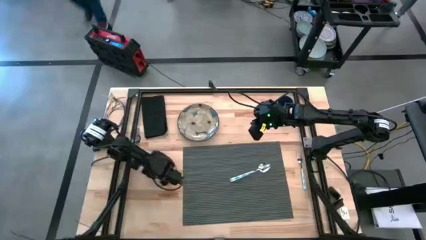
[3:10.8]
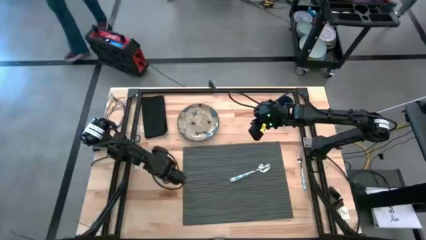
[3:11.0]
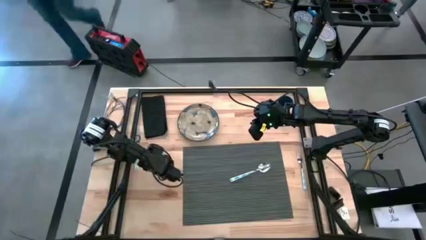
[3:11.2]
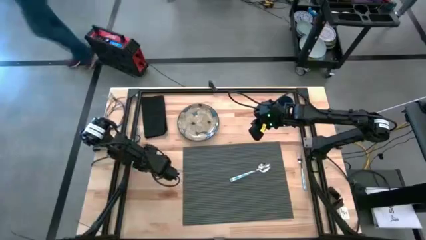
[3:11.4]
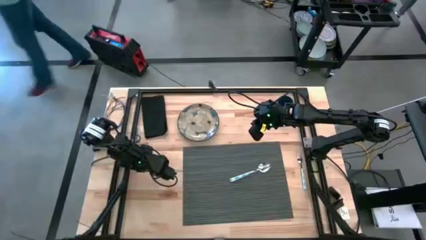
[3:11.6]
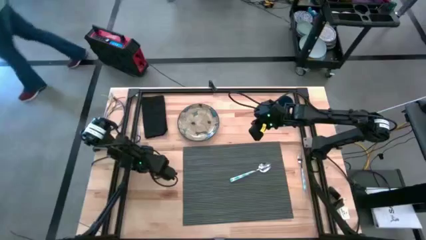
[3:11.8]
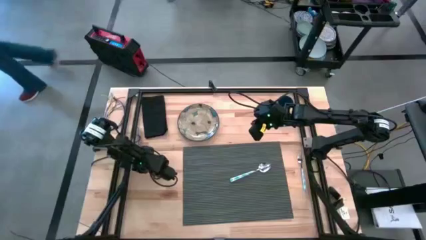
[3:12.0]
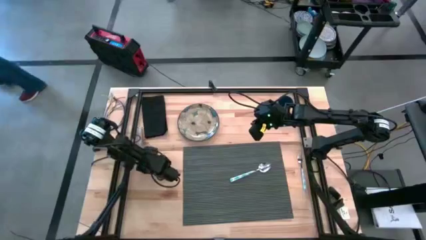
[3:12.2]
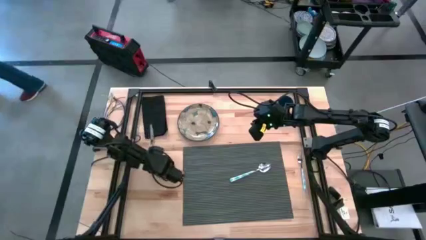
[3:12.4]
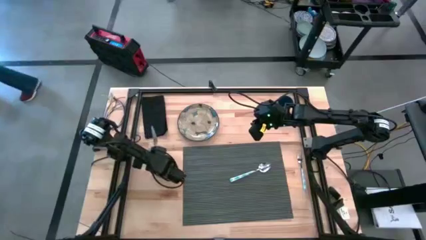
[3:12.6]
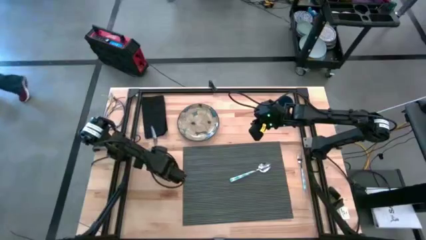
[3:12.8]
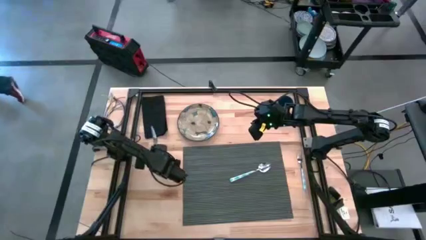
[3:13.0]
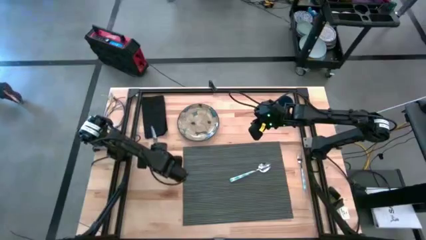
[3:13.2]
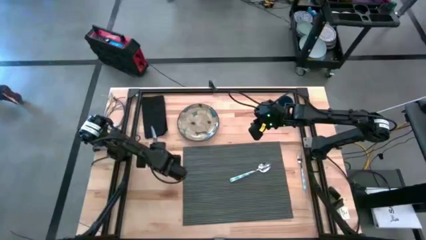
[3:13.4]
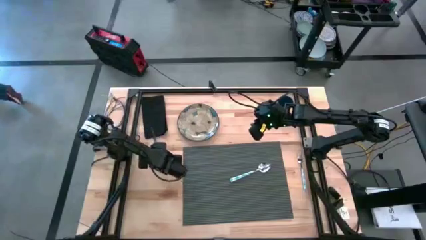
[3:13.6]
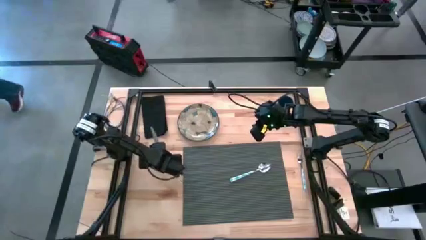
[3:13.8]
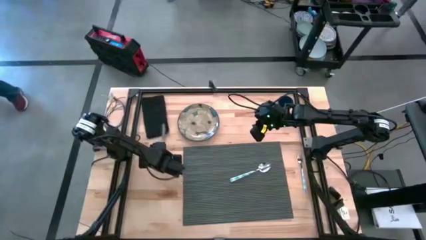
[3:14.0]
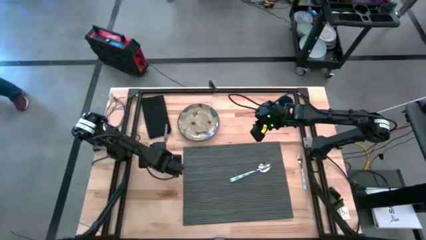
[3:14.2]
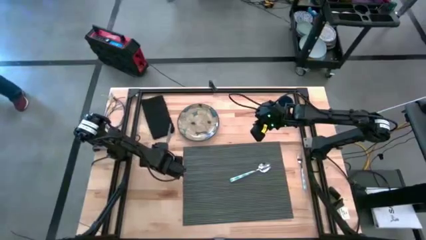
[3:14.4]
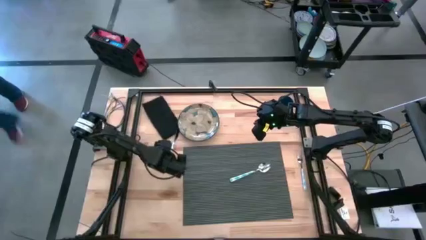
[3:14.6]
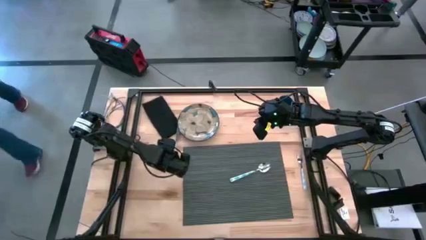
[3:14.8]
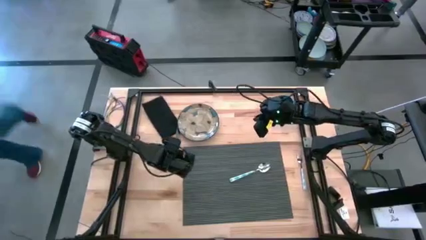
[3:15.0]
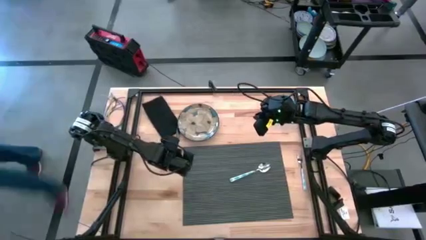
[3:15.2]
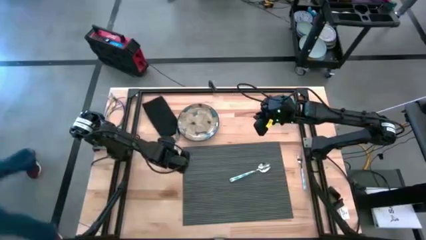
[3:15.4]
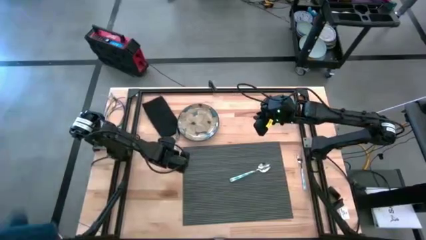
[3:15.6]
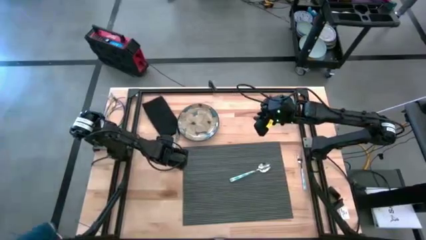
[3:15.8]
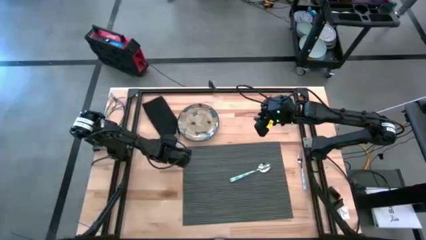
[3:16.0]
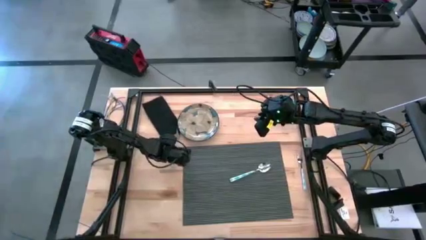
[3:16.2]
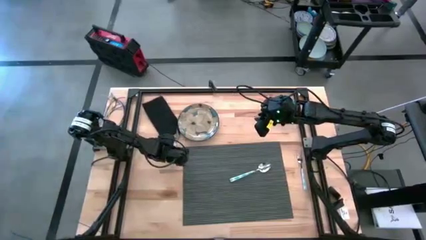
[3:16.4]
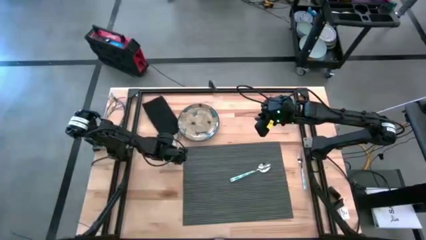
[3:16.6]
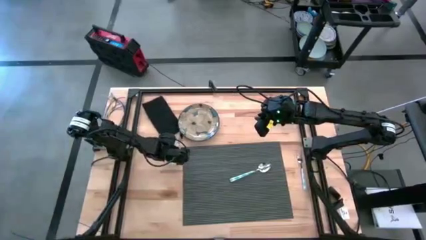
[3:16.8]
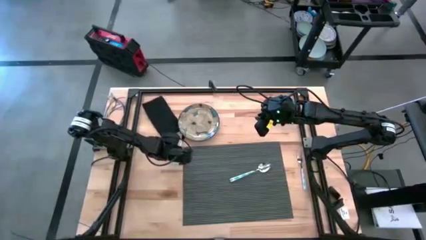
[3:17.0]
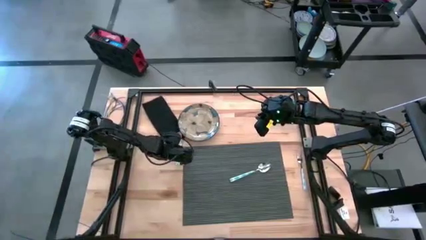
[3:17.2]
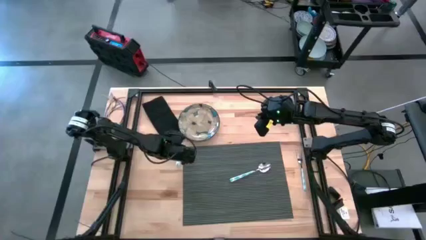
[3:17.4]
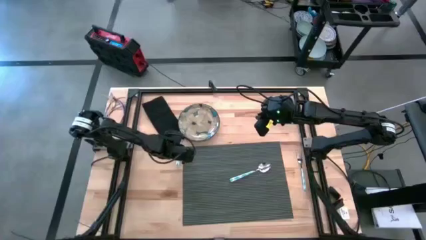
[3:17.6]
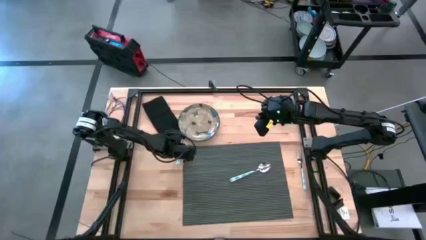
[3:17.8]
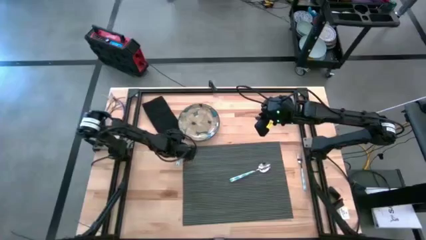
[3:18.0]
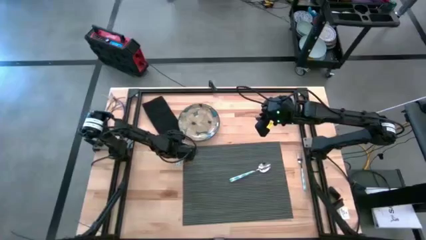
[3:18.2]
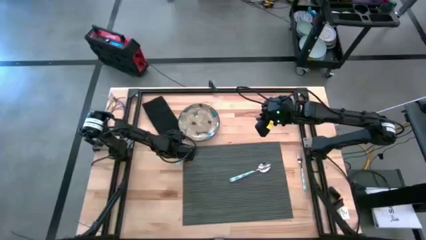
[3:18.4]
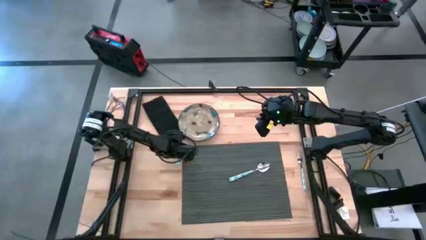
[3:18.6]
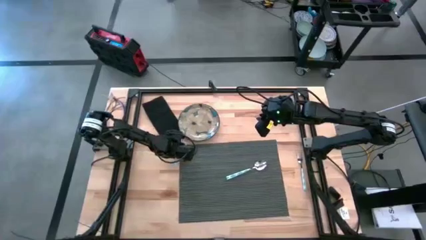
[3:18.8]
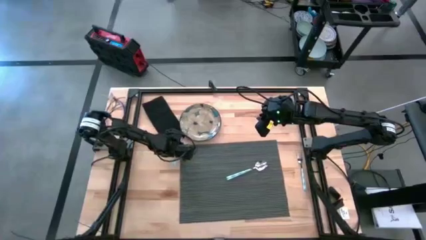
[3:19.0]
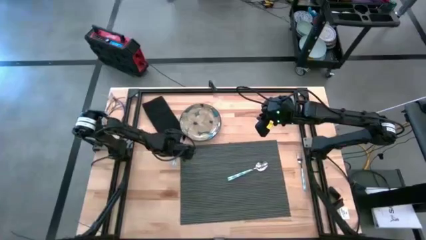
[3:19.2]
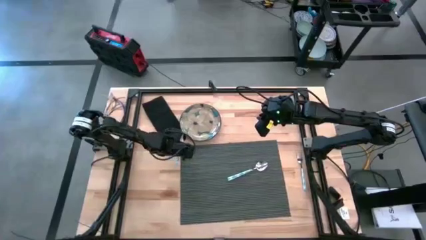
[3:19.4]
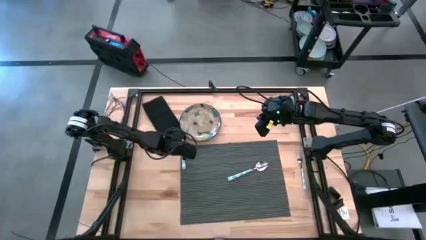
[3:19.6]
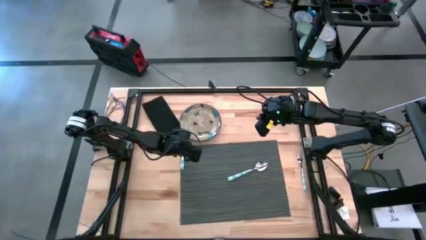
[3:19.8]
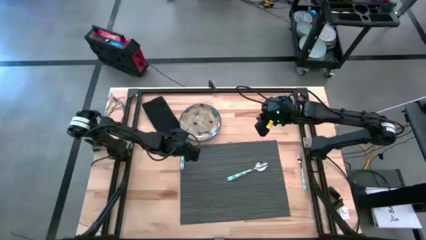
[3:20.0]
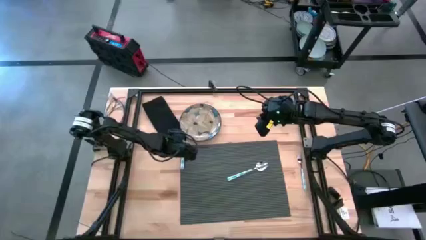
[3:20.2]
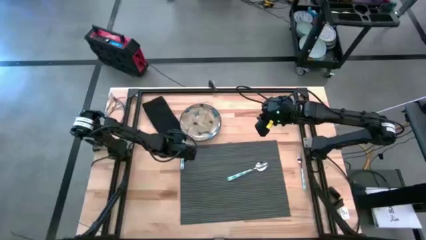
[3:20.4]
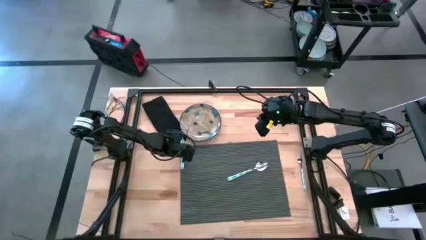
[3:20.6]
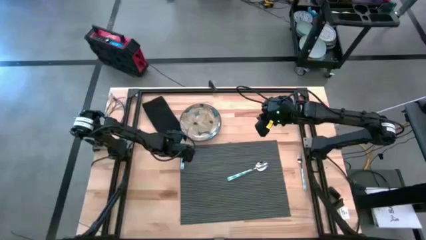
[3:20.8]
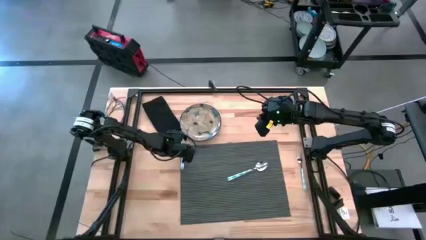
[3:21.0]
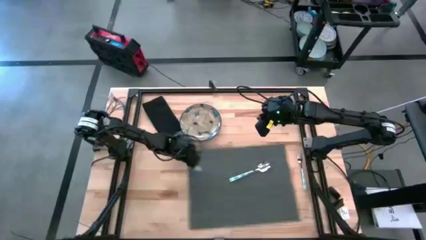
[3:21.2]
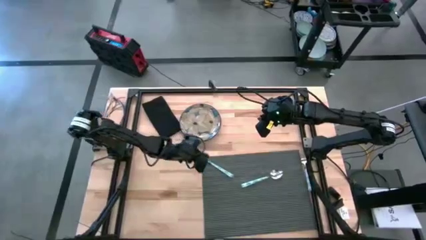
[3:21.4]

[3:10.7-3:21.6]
Task: Set table place
Put the blue knife on the gray mat

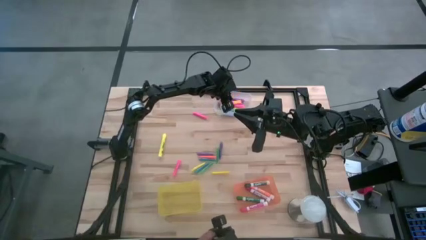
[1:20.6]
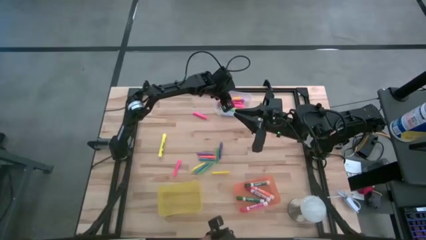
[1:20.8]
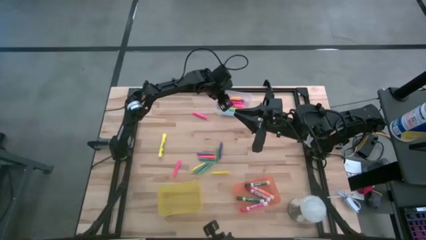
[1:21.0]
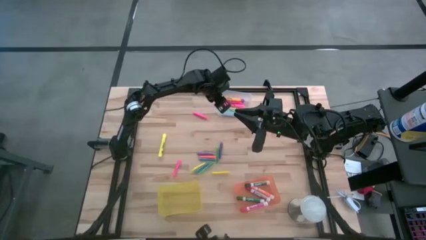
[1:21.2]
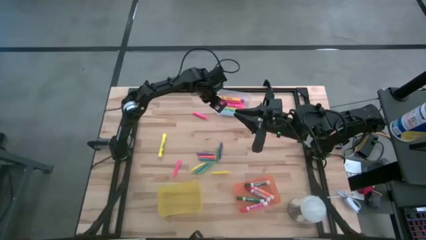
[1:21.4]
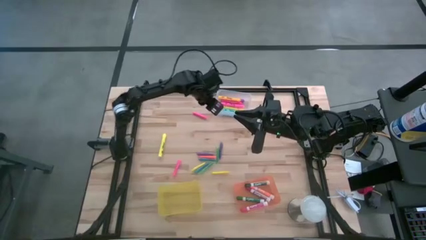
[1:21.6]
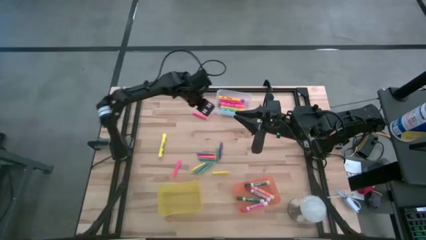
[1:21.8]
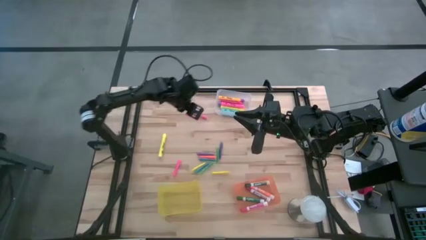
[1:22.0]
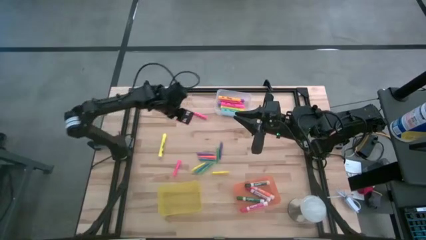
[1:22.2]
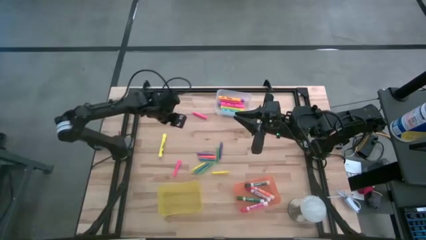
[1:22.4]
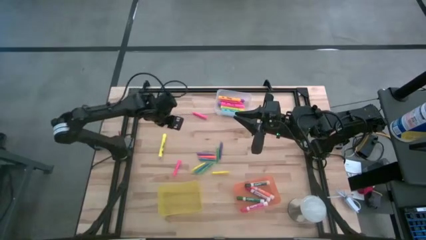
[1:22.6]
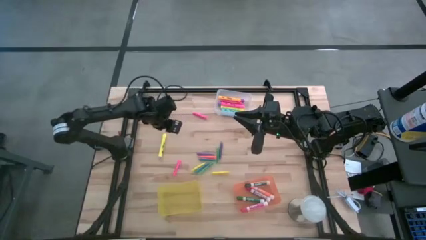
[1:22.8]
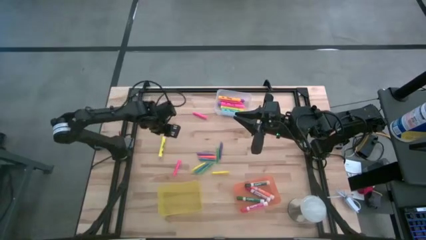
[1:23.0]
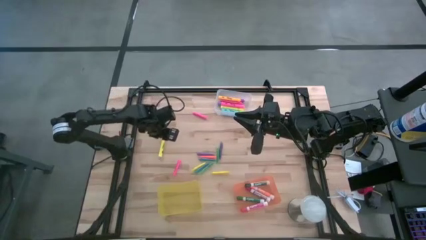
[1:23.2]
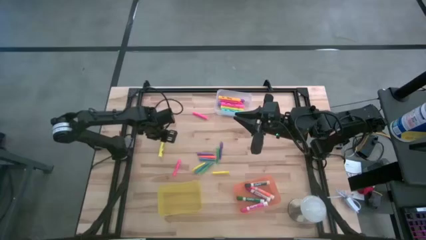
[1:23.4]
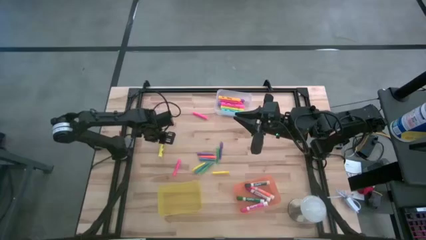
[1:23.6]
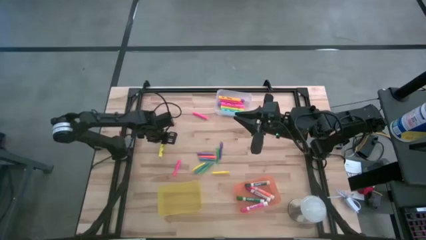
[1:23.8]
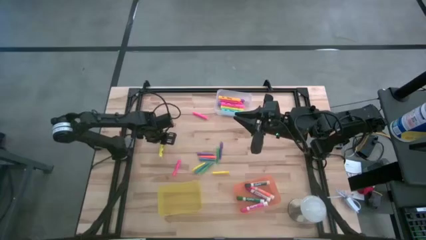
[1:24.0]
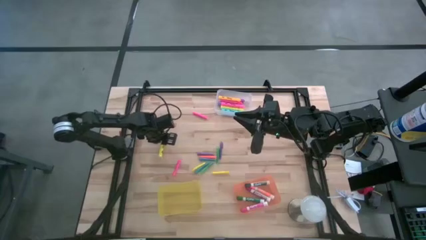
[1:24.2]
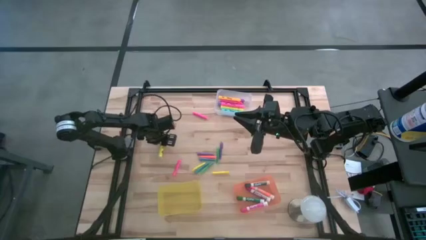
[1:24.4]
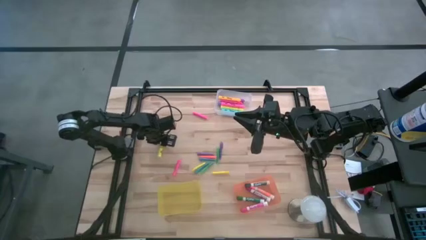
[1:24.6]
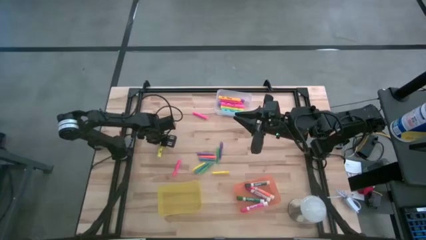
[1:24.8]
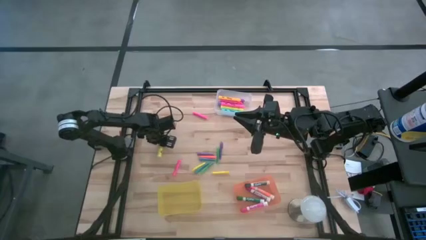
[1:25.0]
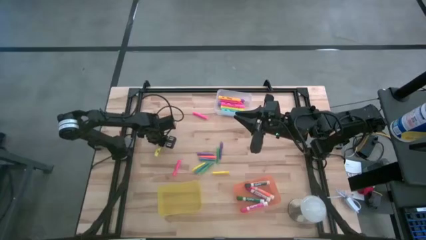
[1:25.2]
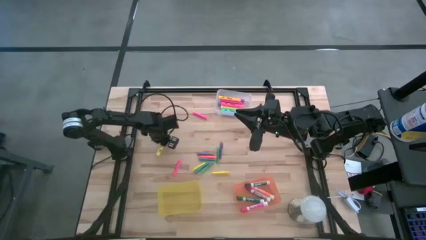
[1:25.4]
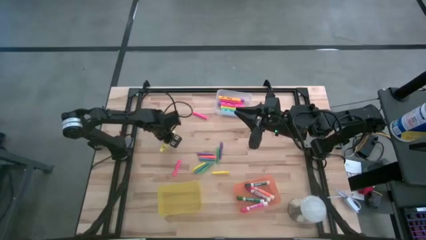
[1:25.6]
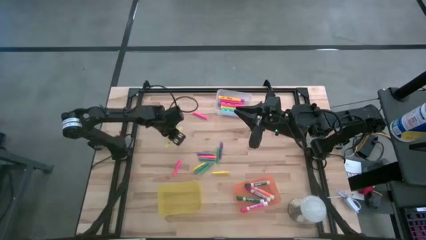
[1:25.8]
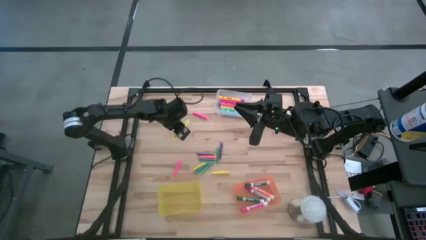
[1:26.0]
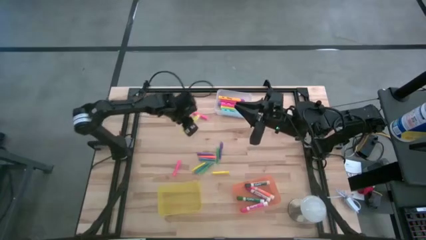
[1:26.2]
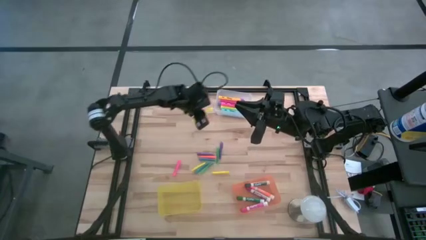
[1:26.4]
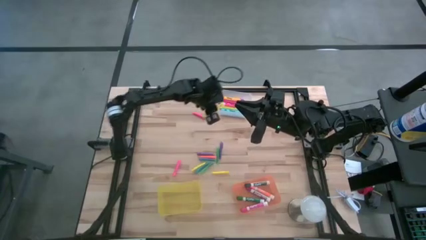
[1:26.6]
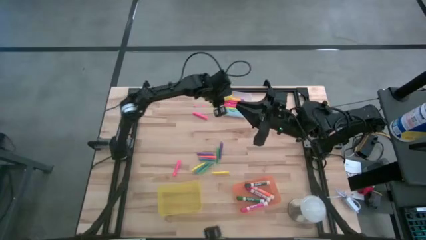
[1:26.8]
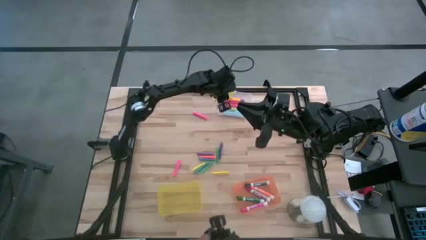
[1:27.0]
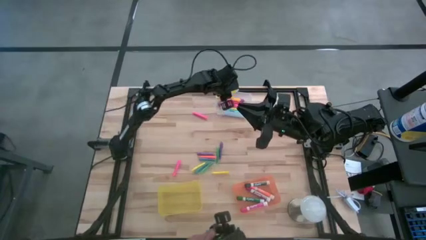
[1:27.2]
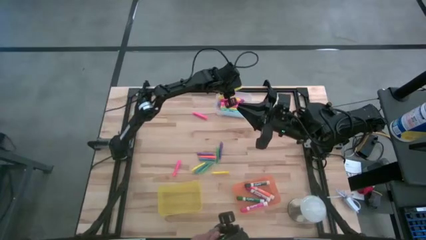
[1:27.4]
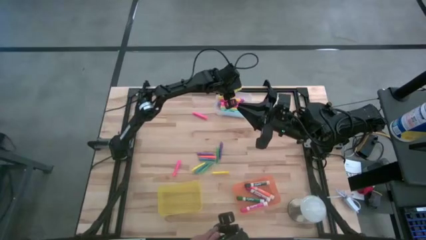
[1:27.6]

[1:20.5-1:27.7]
Task: Pick & Place Markers
Put the light yellow highlighter pen into the transparent bin
